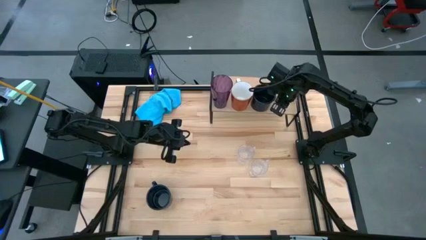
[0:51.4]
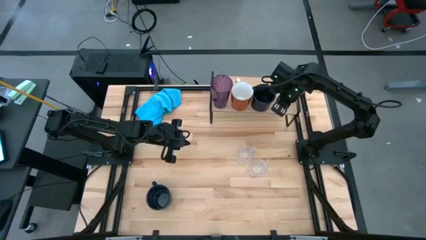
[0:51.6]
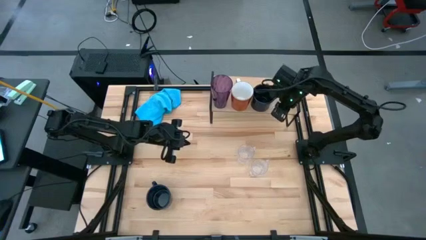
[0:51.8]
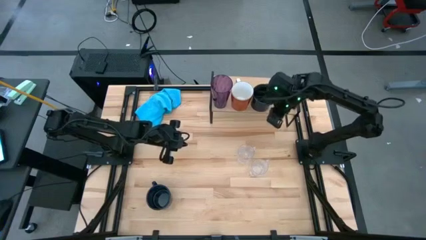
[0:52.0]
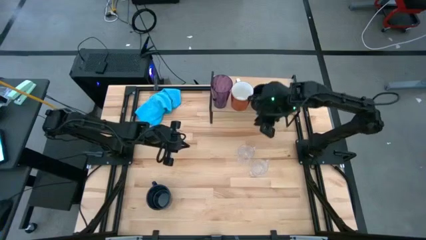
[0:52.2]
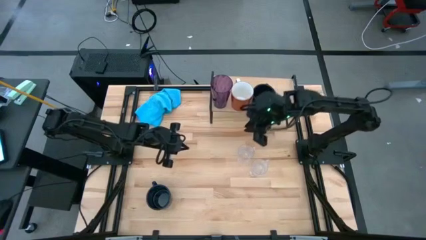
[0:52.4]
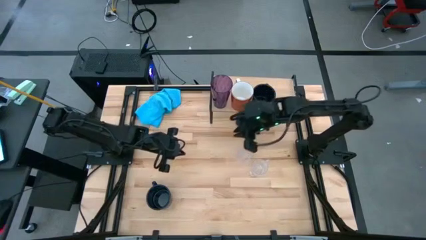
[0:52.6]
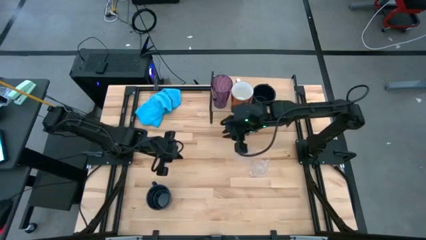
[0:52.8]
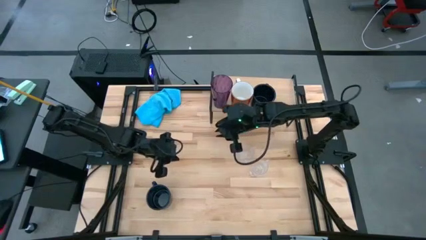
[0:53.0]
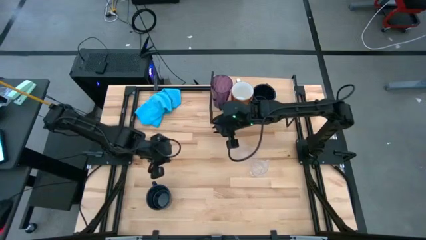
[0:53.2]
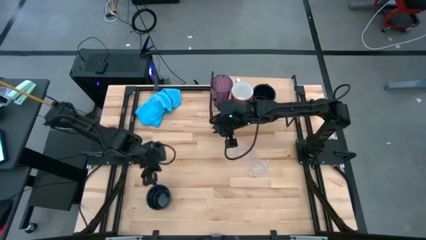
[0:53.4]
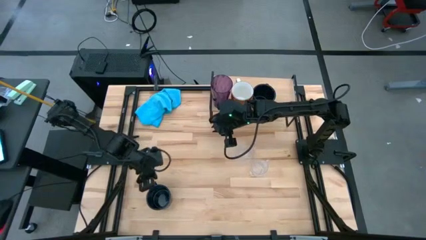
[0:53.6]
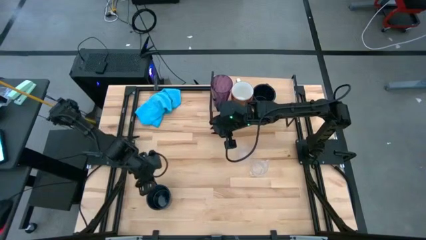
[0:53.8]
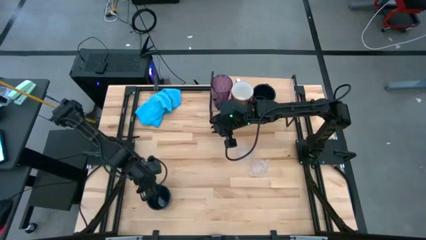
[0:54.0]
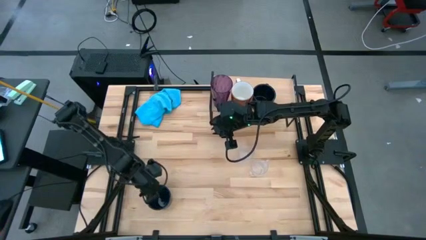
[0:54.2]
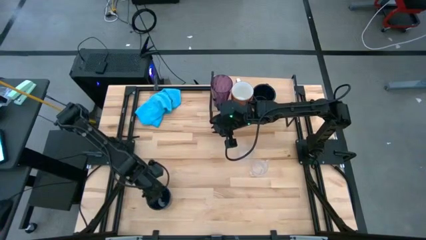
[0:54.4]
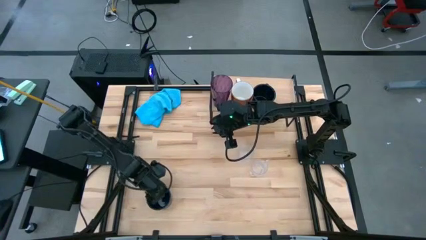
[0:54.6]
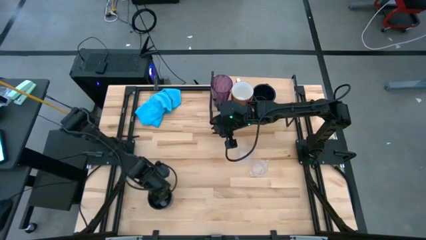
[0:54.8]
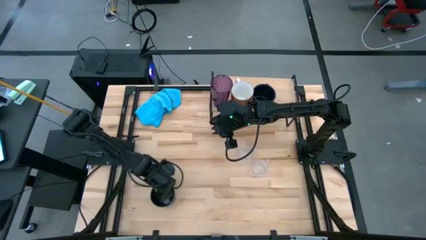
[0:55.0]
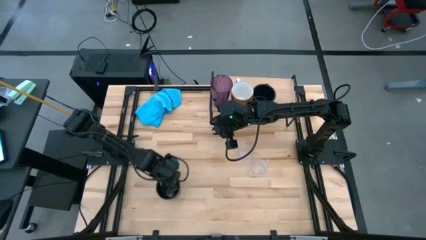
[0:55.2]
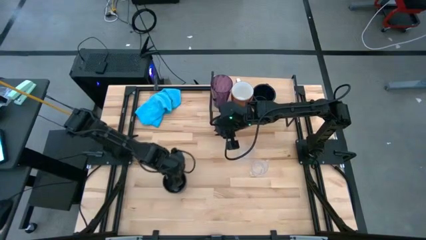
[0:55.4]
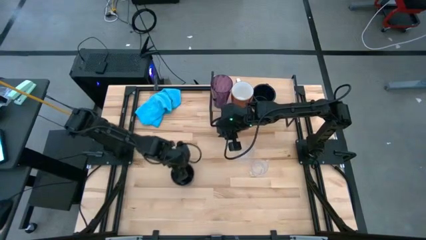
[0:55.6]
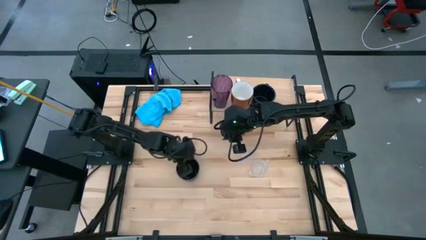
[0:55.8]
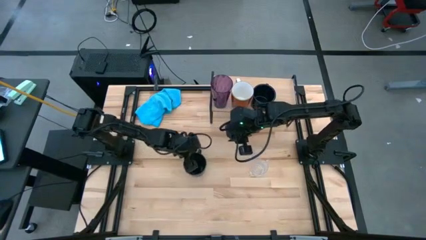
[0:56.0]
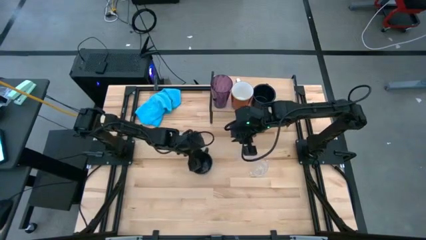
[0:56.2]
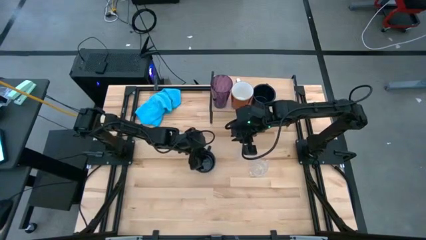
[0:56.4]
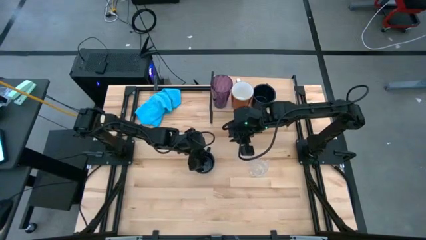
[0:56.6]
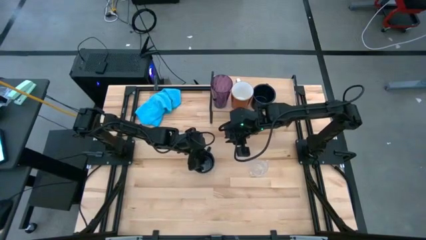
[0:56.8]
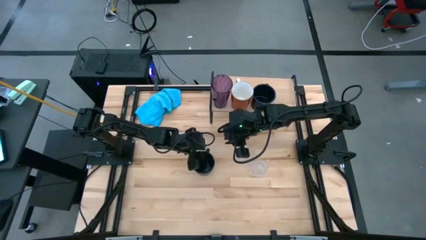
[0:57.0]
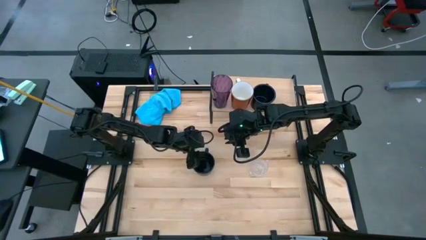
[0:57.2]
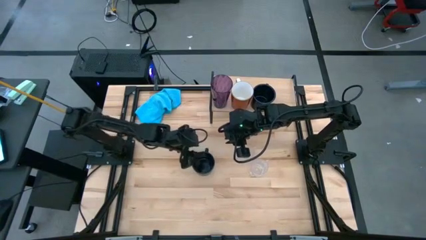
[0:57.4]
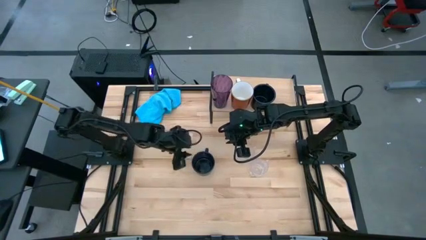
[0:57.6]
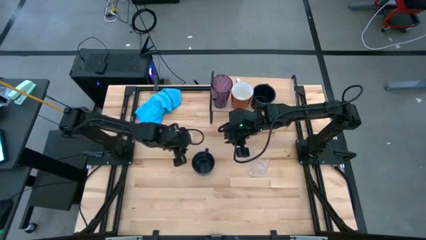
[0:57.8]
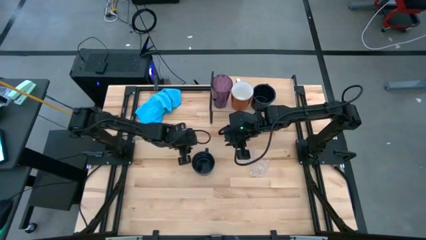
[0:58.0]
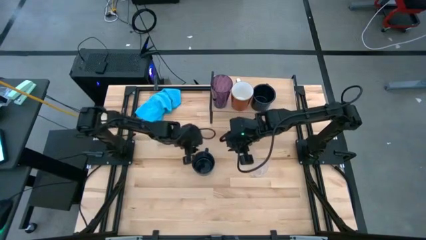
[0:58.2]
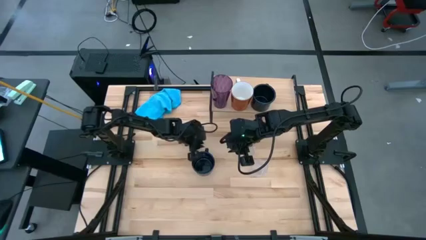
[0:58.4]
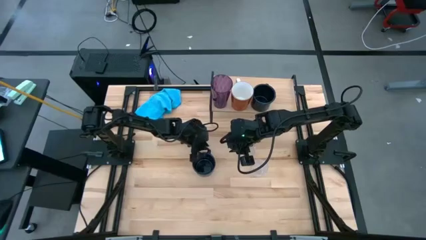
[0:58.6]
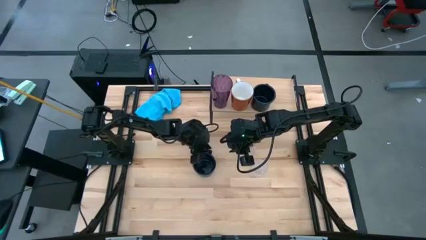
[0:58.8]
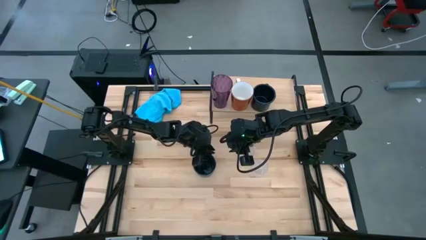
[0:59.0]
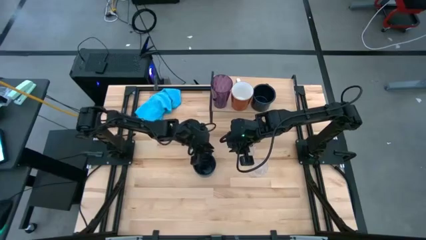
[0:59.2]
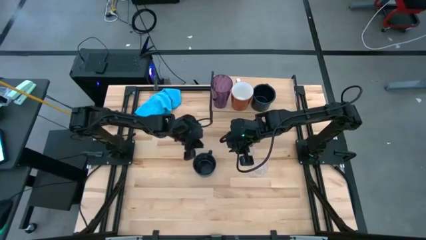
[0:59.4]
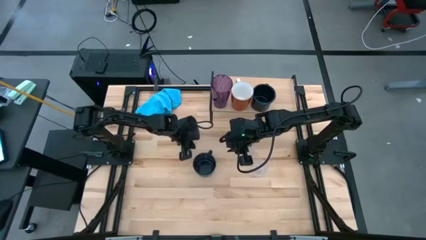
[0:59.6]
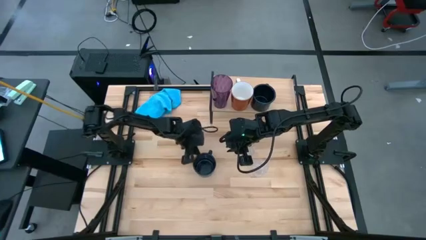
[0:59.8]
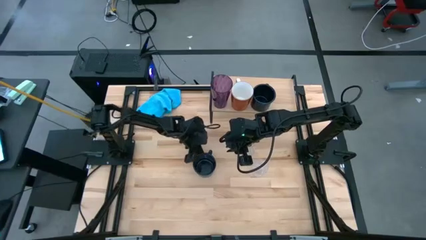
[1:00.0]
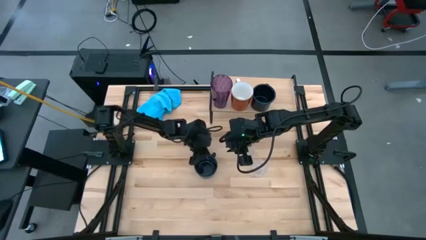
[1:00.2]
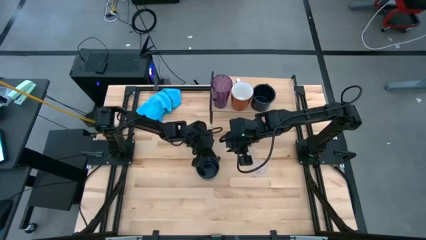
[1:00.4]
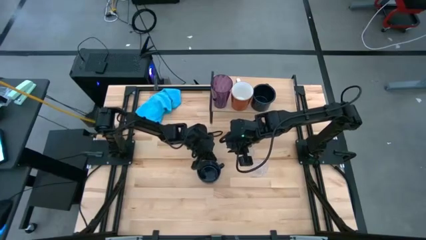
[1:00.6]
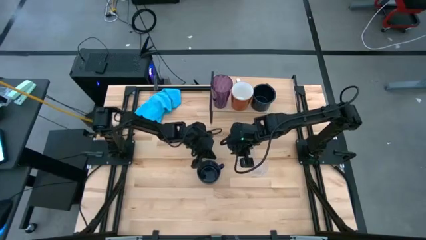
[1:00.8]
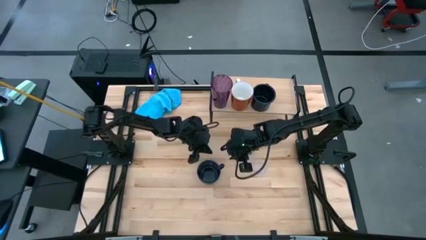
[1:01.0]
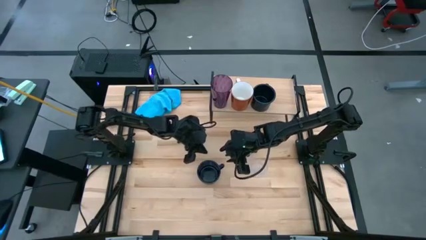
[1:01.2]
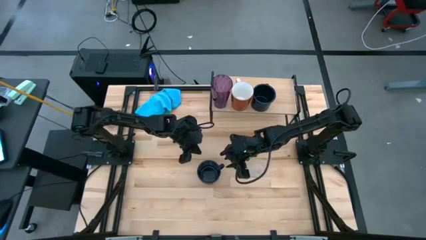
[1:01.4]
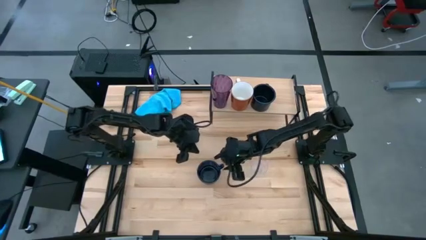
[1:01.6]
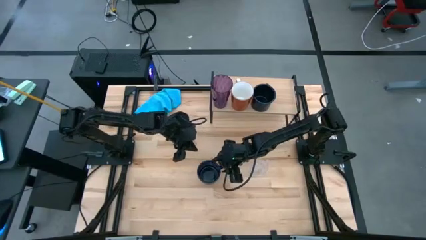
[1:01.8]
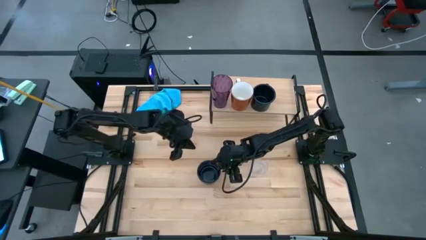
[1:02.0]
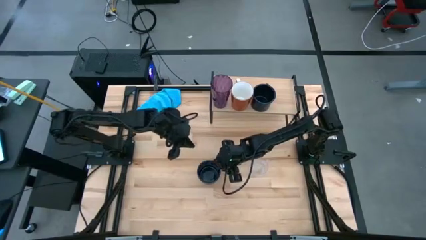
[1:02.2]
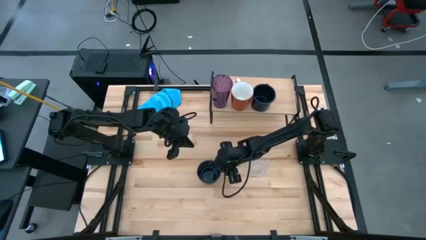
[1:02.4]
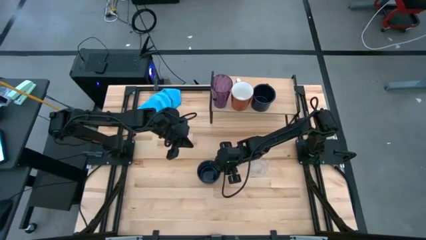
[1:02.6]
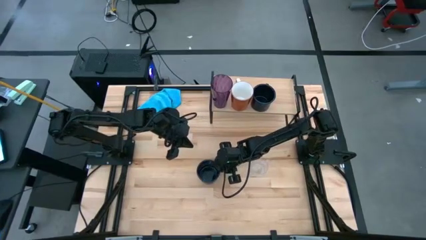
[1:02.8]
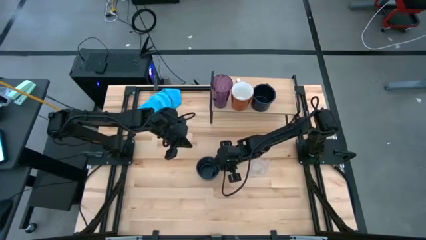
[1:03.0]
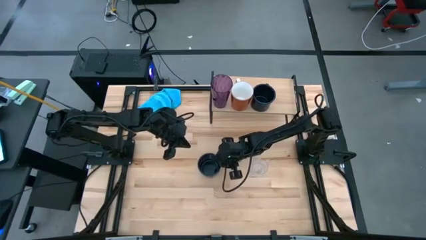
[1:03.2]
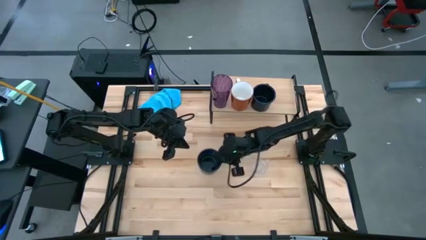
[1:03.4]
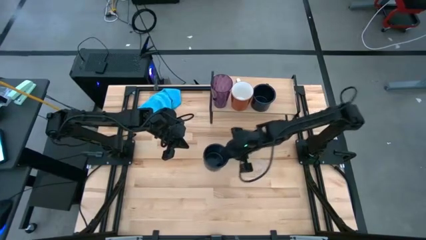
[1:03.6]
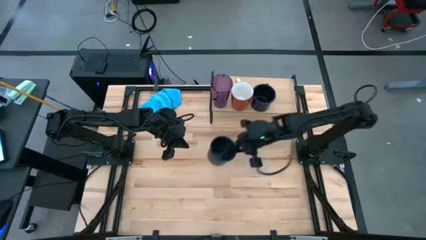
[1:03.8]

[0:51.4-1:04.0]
Task: Stack small to large cups/mugs on shelf
Put the dark blue mug on the shelf
